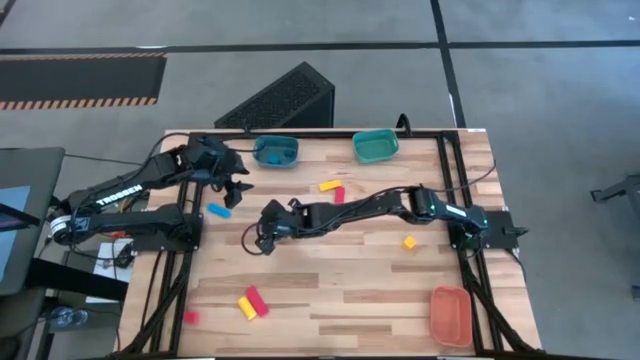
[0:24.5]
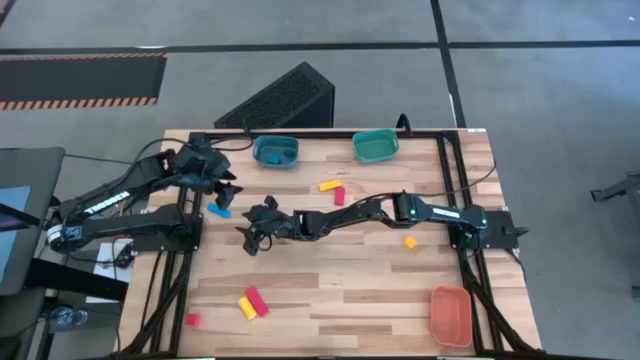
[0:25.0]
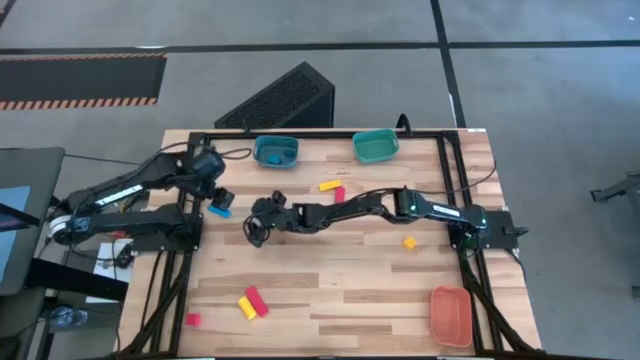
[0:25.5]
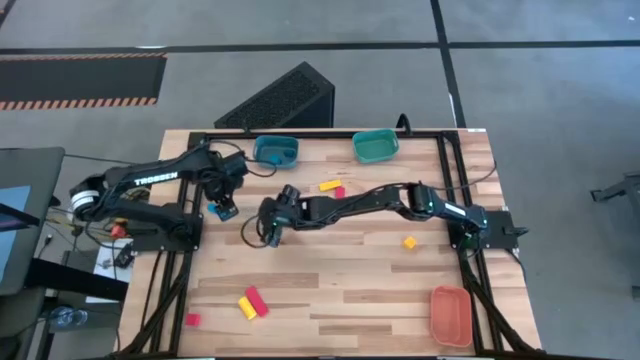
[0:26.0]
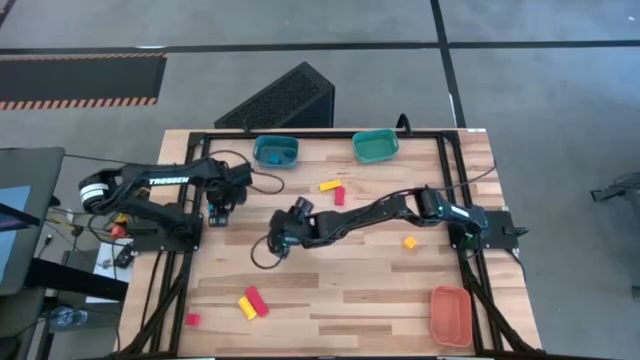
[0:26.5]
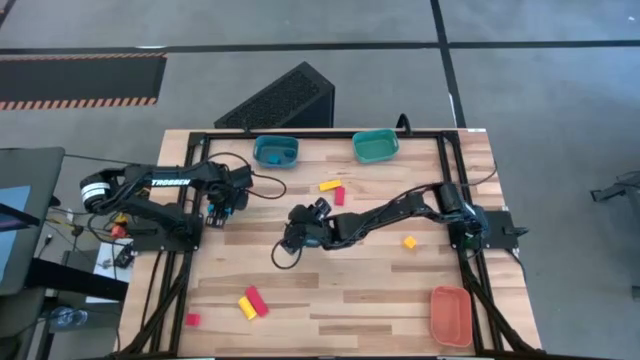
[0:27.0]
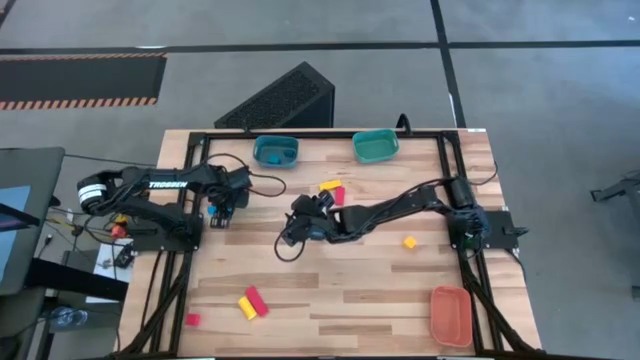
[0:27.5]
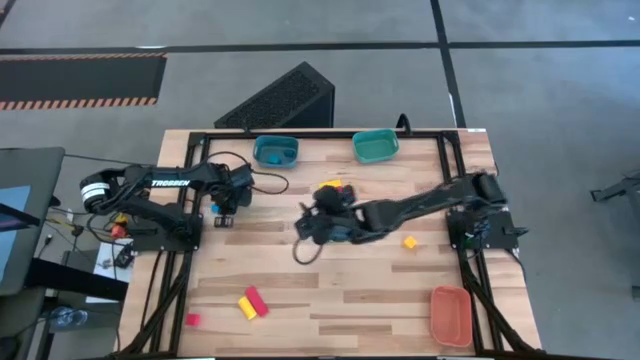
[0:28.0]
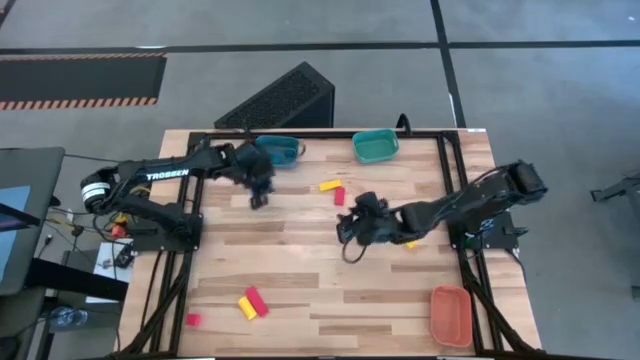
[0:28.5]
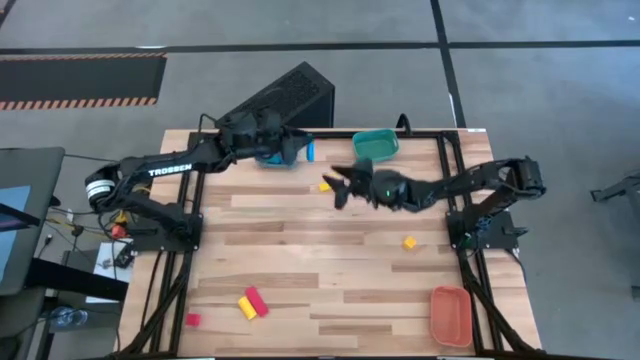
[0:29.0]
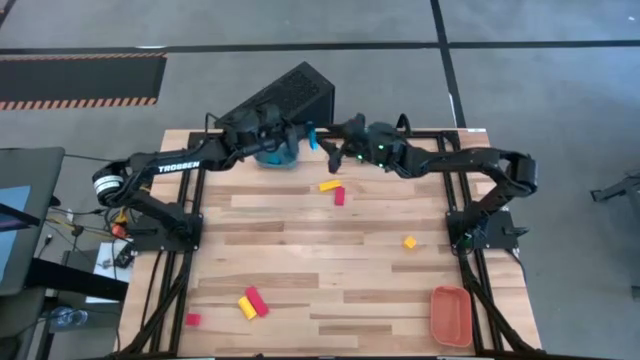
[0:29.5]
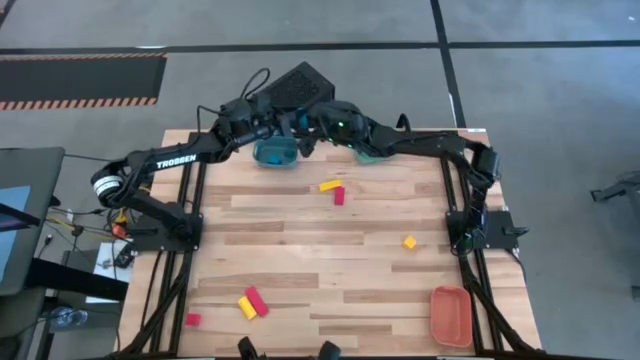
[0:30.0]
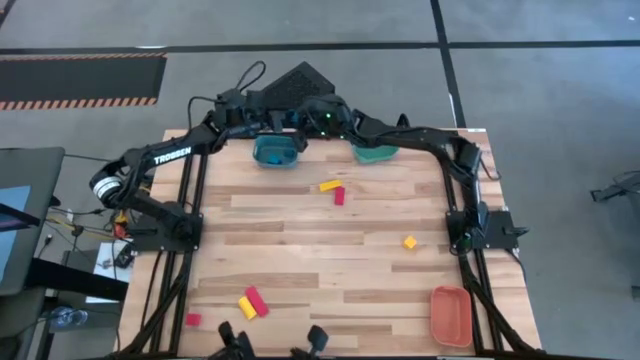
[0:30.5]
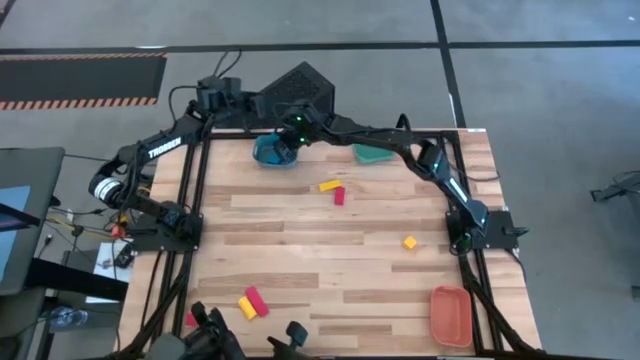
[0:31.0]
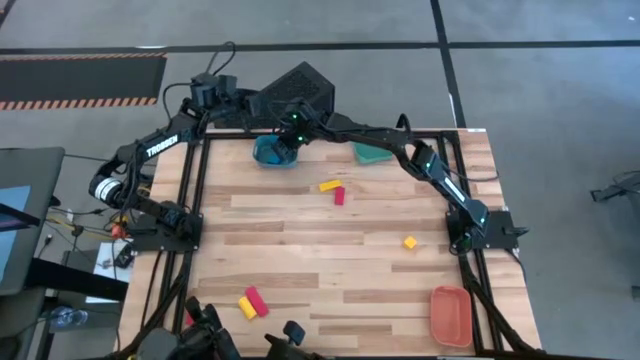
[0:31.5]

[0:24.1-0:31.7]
Task: Sort & place blocks by color
Put the blue block into the blue bin

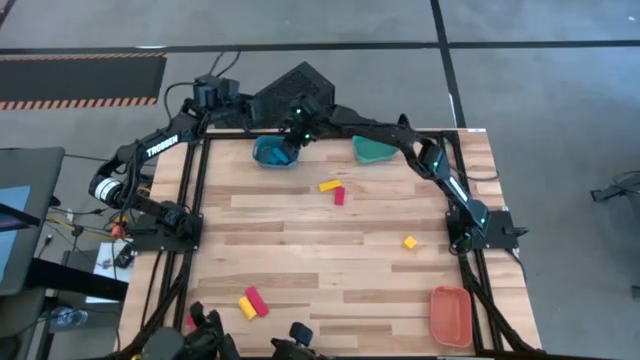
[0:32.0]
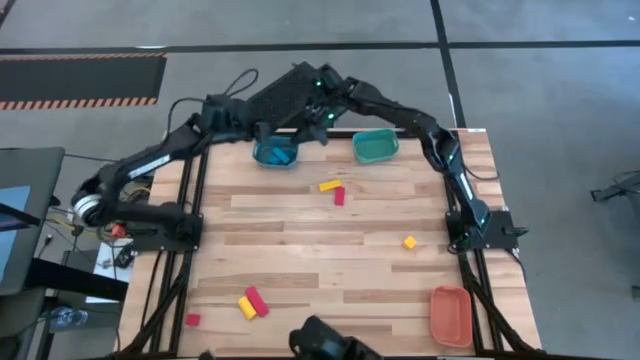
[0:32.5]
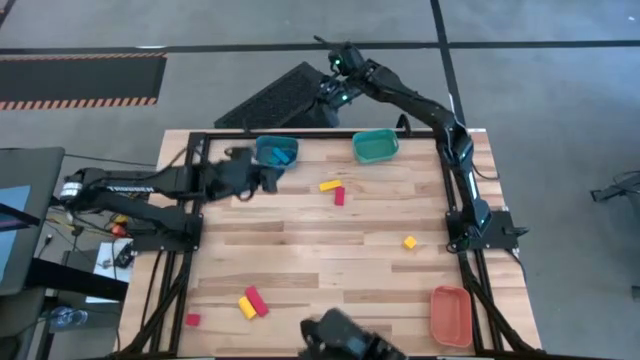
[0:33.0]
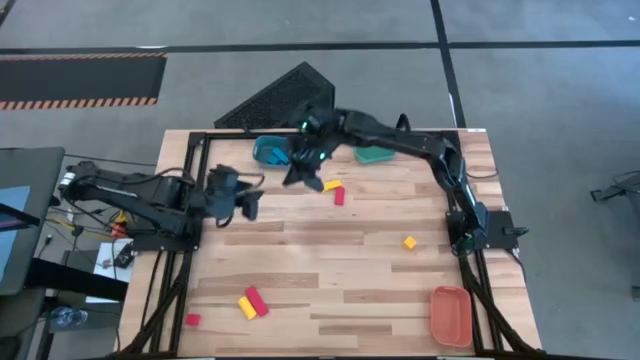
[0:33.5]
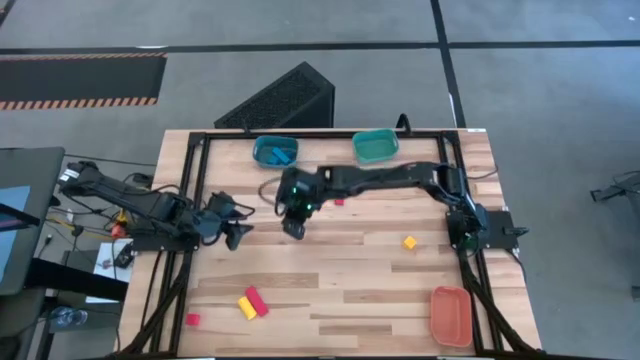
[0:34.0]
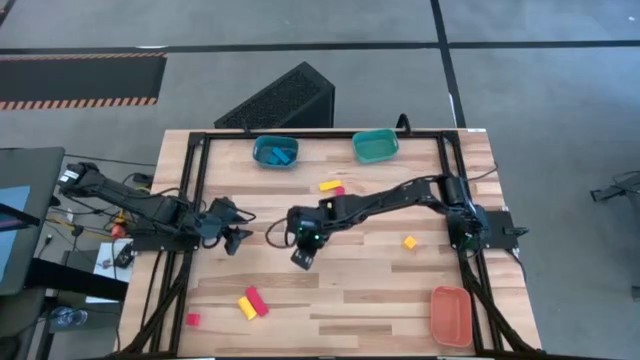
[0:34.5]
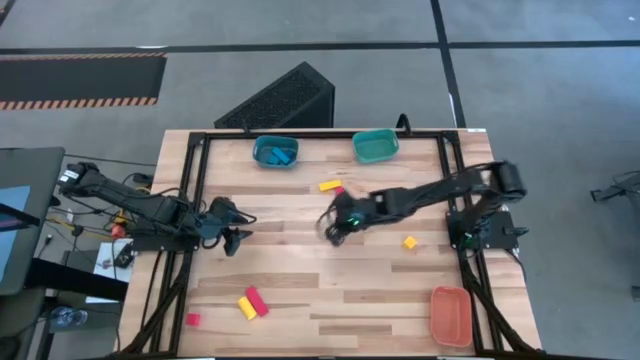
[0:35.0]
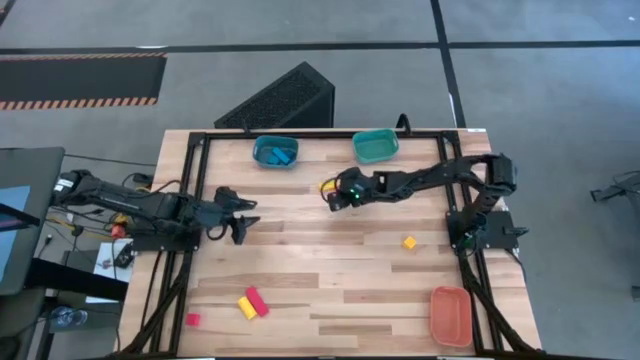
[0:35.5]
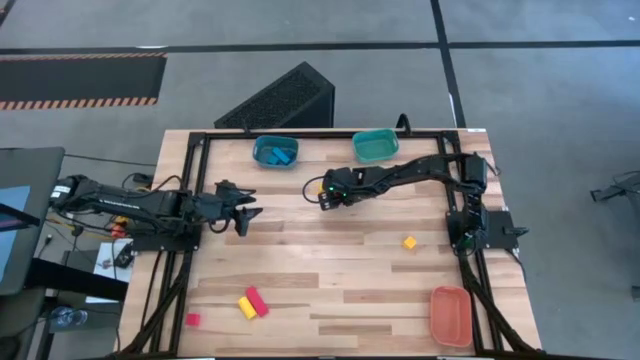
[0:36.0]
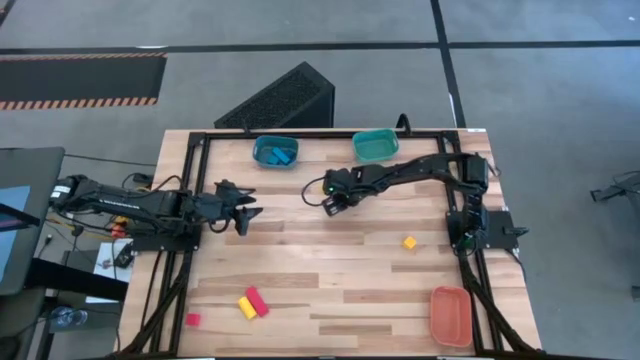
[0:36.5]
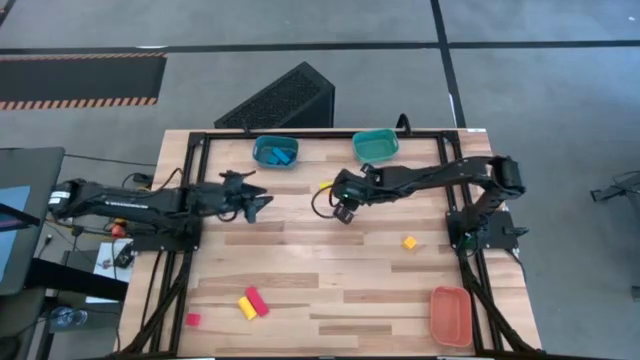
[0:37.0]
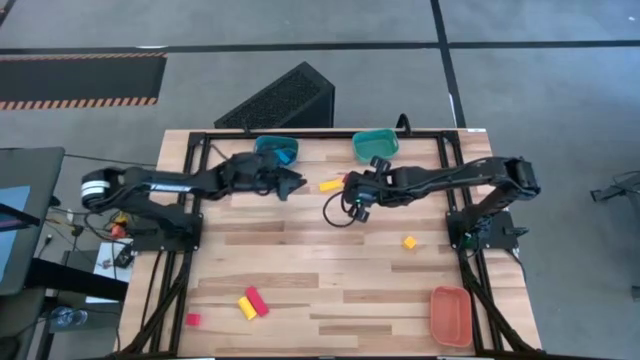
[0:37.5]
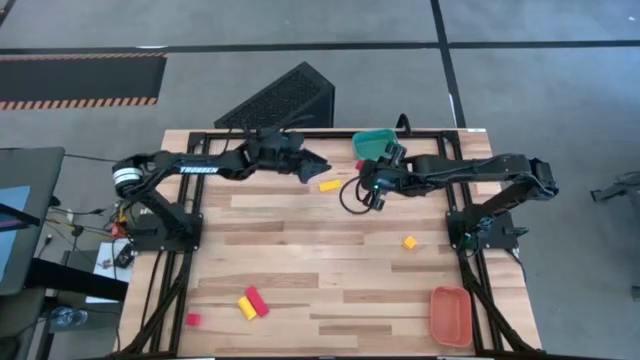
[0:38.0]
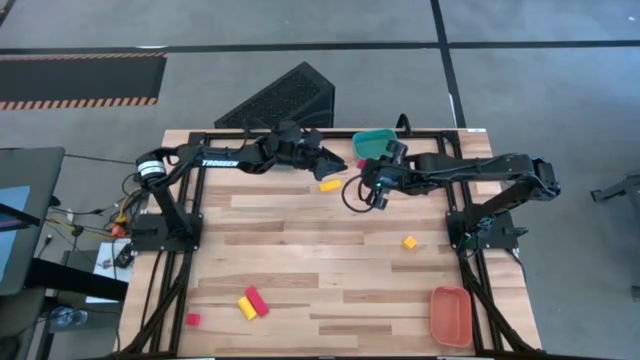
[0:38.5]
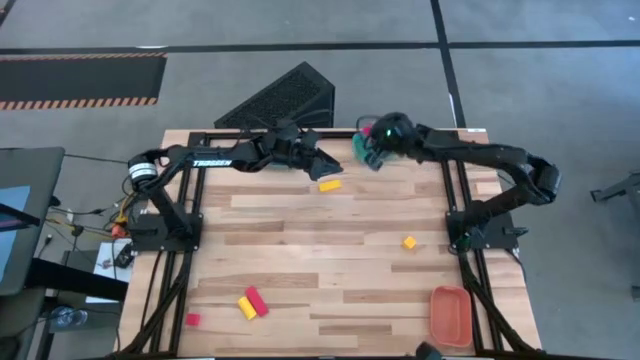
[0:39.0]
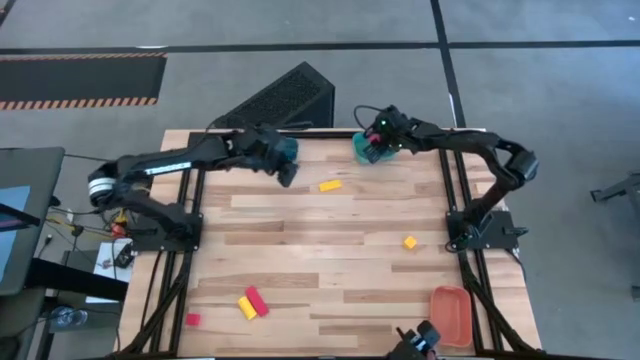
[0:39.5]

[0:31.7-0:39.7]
Put the top red block into the green bin

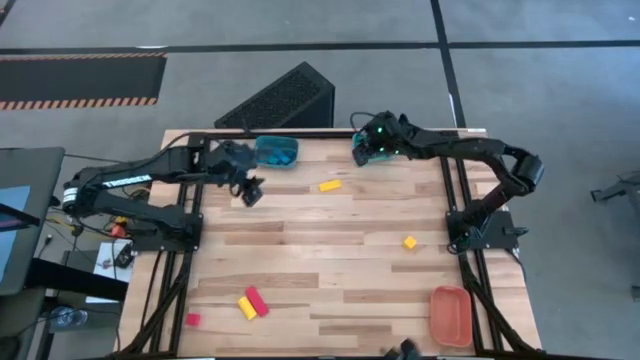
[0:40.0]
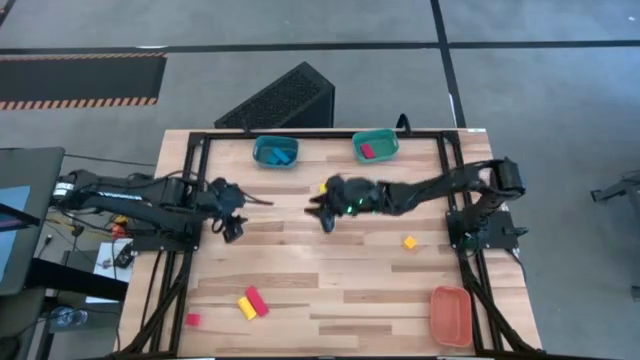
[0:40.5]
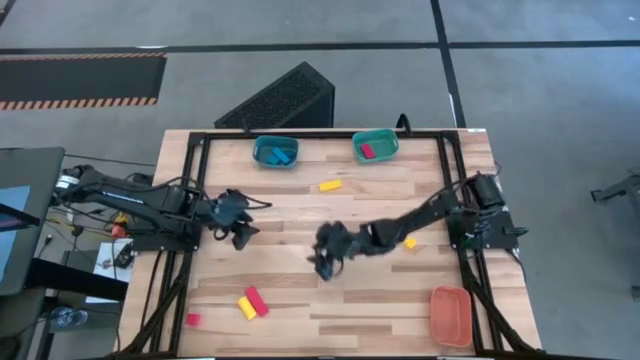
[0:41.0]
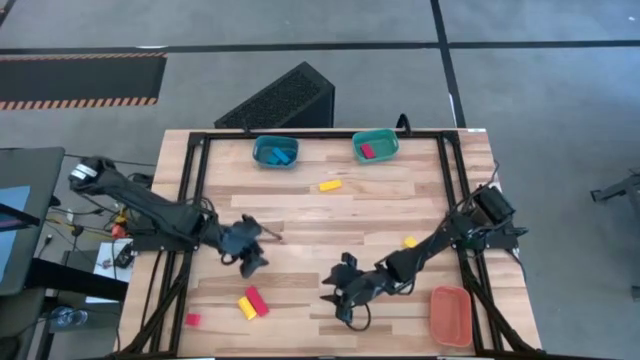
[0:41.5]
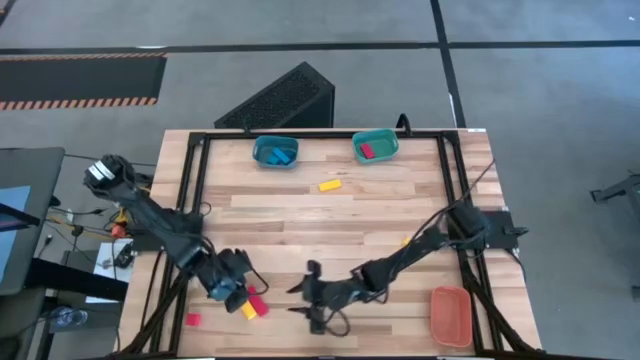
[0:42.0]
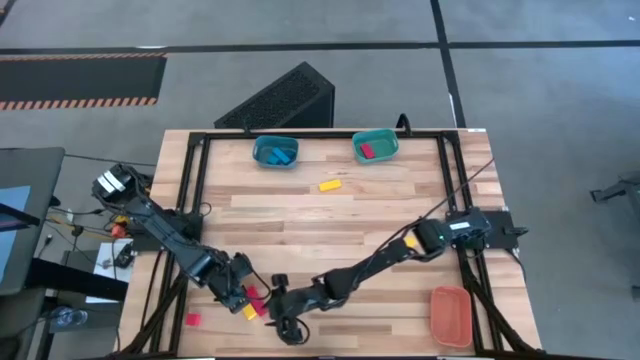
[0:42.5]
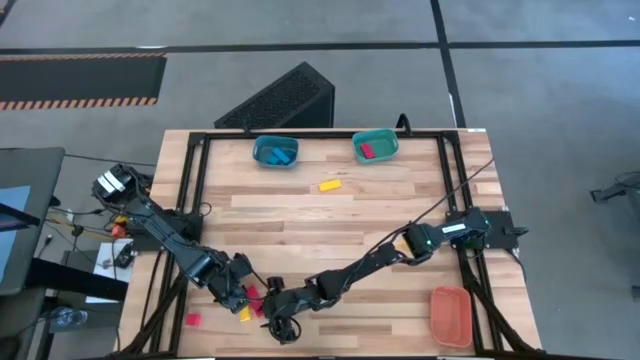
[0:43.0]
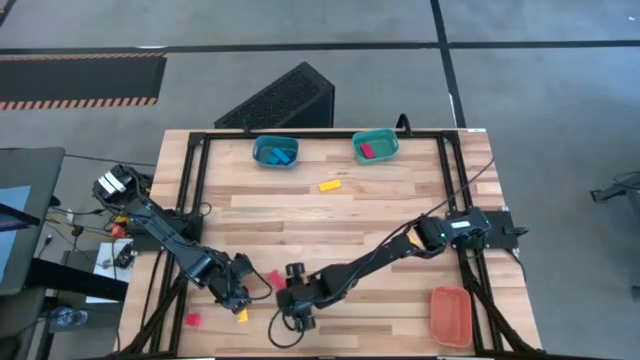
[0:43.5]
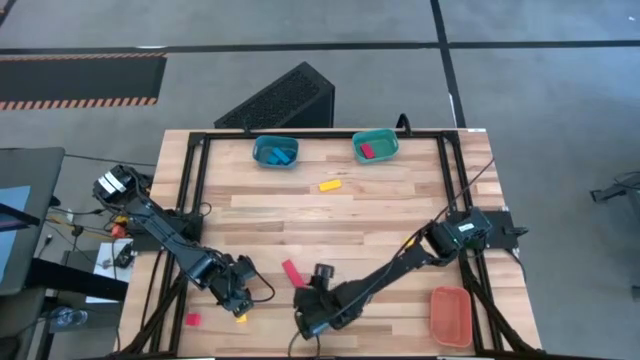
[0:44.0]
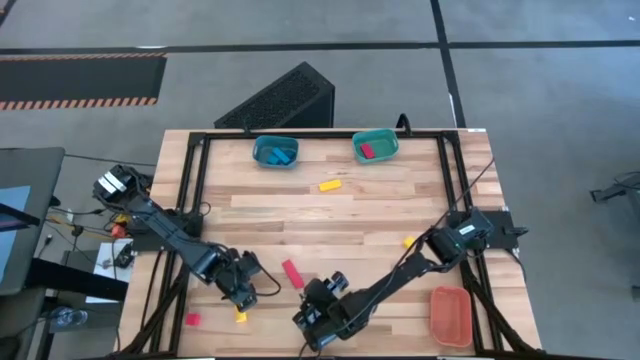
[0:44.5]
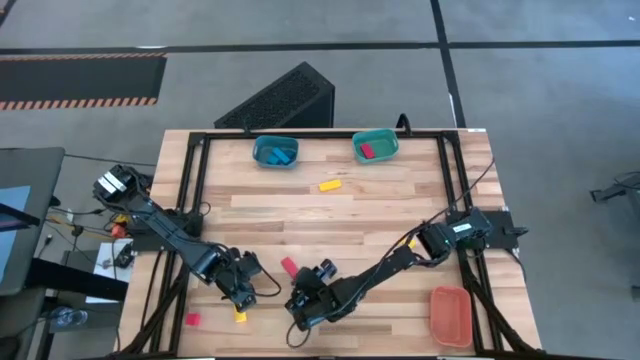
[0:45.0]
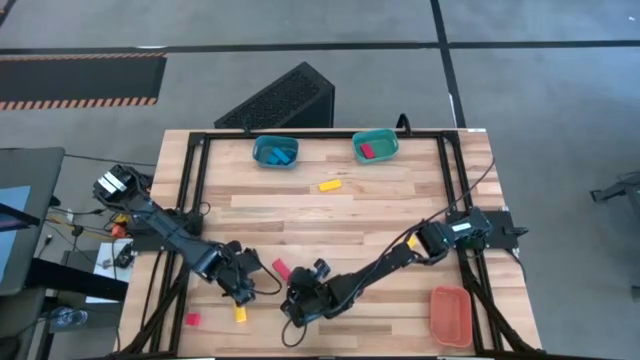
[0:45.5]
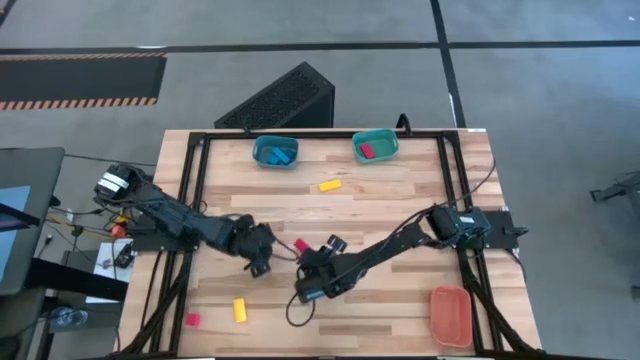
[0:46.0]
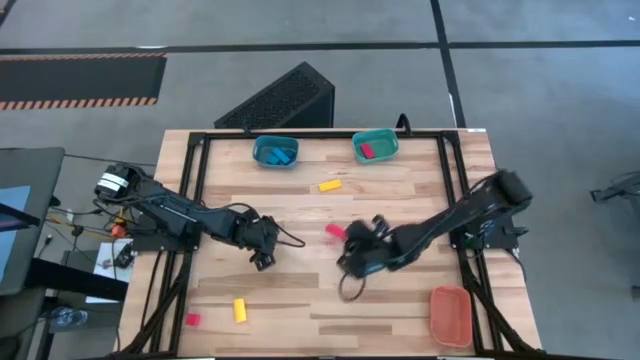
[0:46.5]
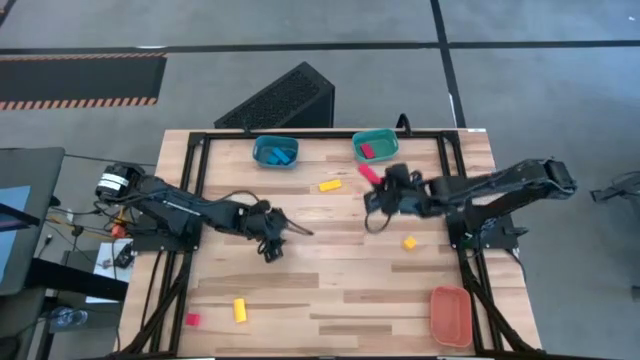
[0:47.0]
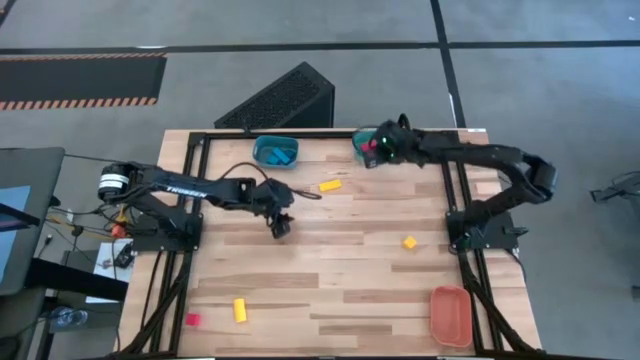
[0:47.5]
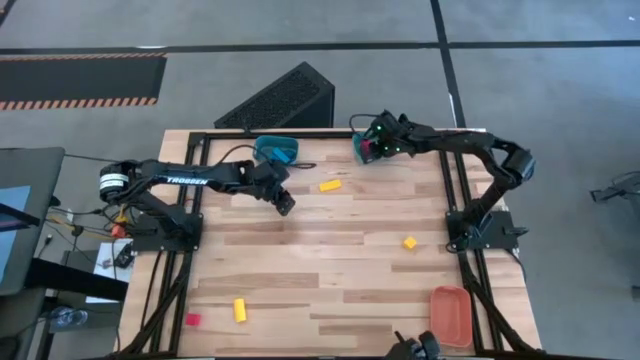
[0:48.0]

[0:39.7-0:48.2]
Put the right red block into the green bin
